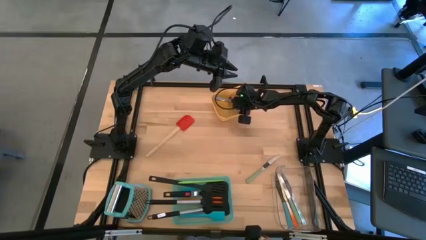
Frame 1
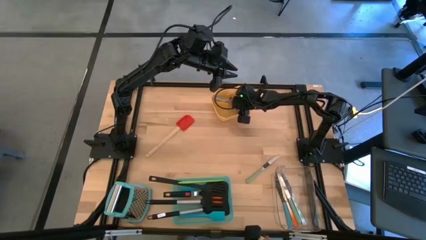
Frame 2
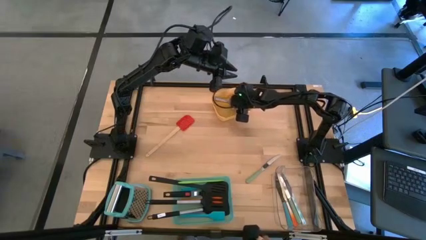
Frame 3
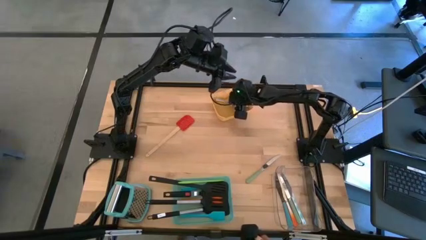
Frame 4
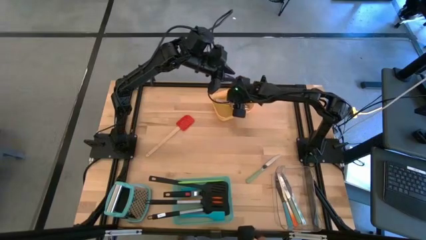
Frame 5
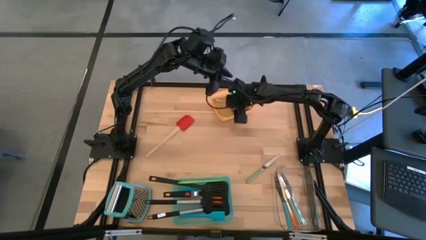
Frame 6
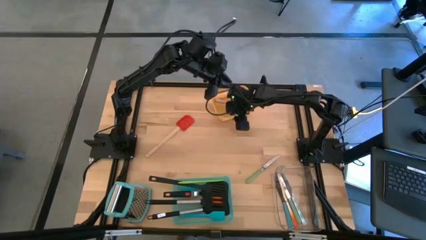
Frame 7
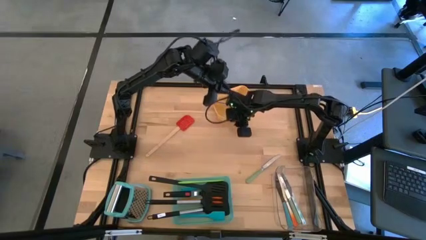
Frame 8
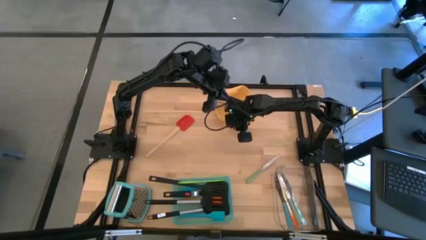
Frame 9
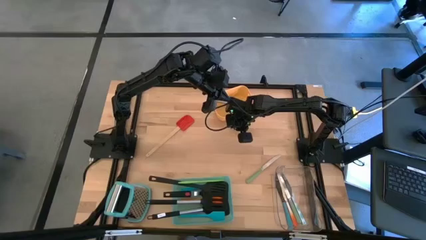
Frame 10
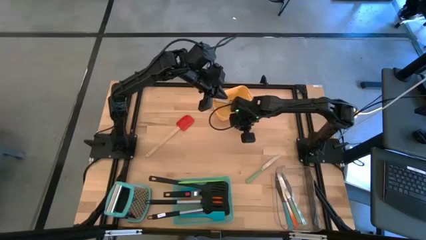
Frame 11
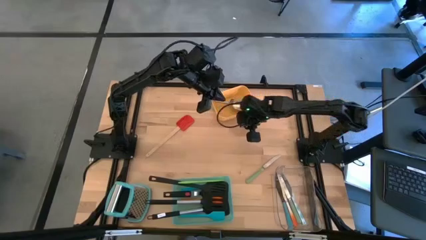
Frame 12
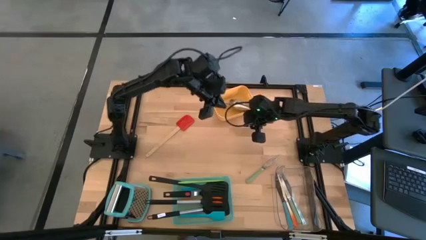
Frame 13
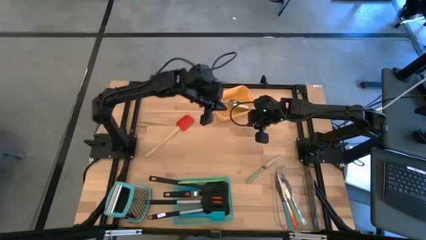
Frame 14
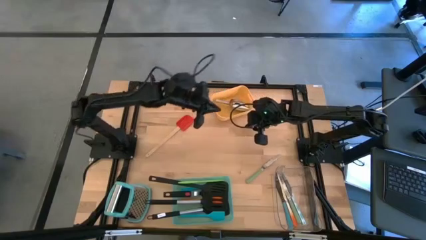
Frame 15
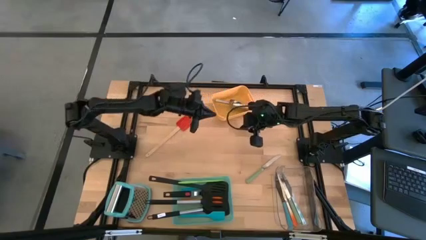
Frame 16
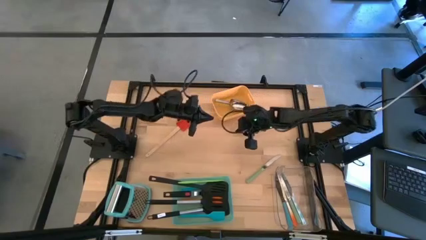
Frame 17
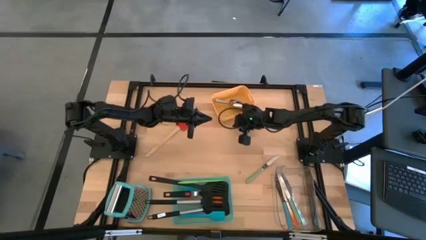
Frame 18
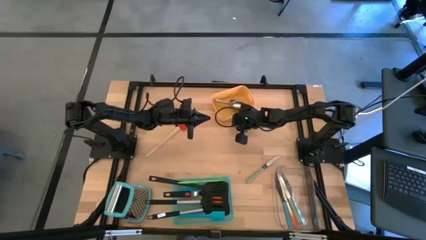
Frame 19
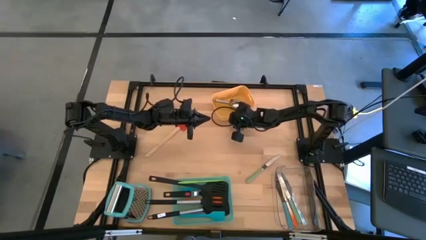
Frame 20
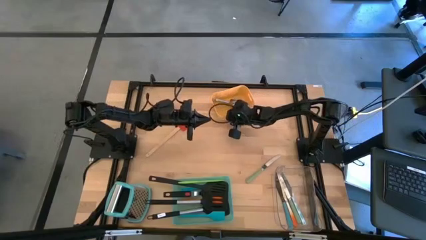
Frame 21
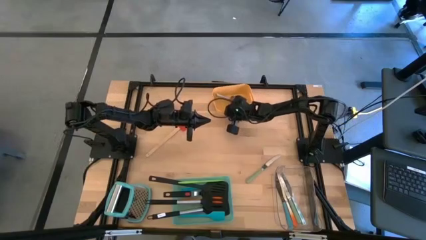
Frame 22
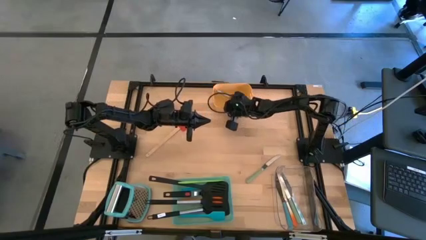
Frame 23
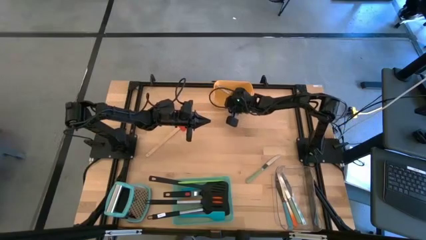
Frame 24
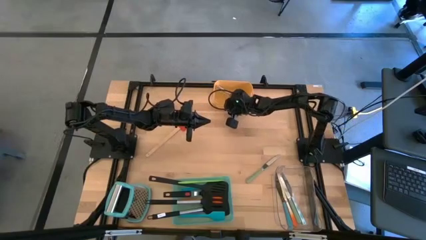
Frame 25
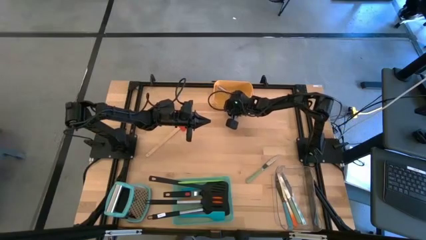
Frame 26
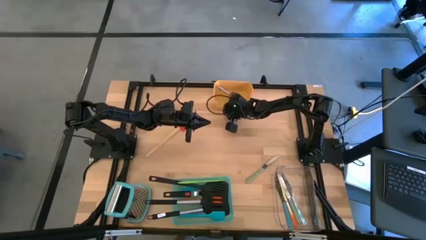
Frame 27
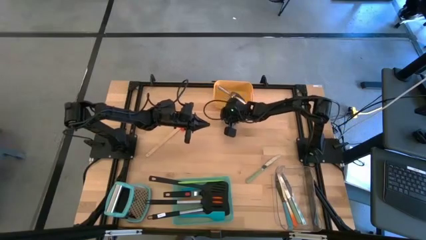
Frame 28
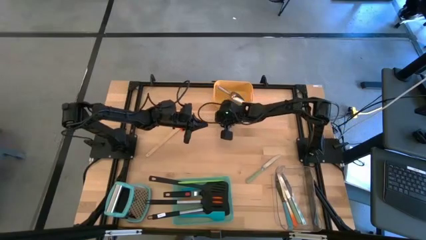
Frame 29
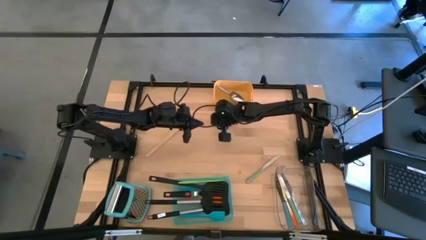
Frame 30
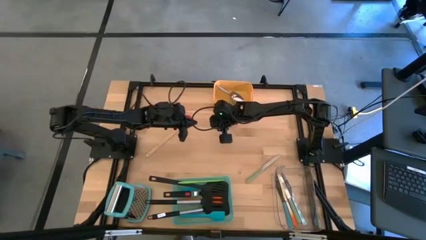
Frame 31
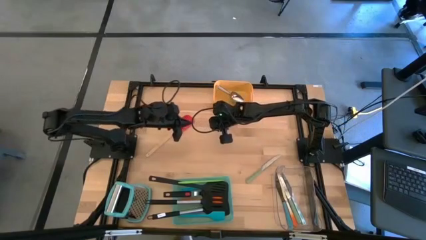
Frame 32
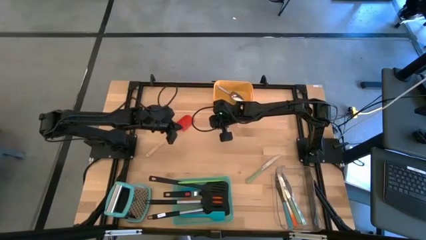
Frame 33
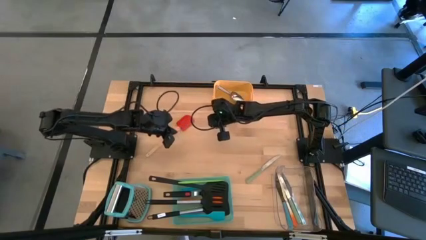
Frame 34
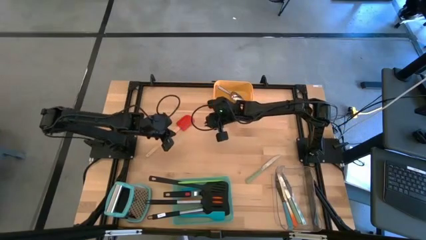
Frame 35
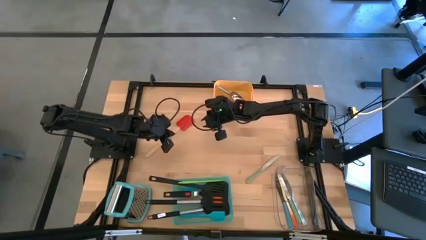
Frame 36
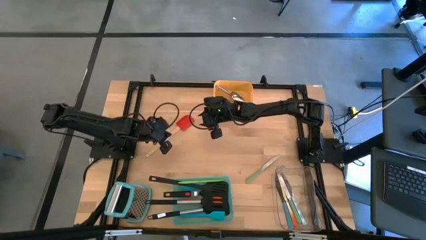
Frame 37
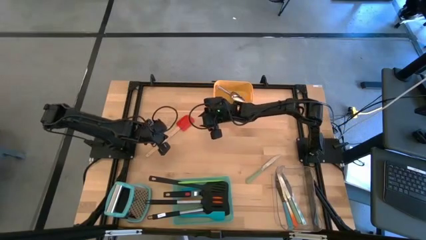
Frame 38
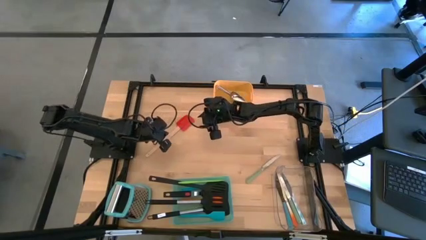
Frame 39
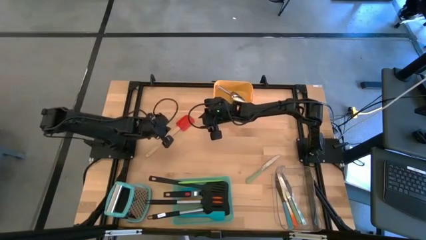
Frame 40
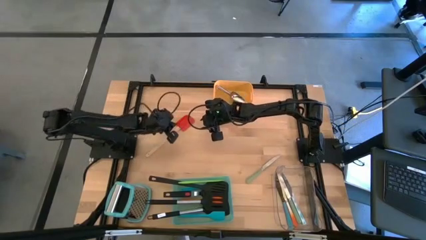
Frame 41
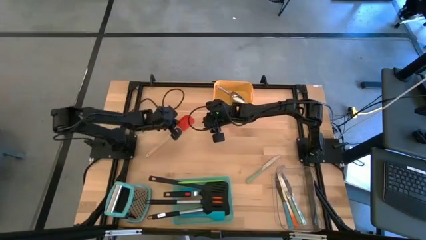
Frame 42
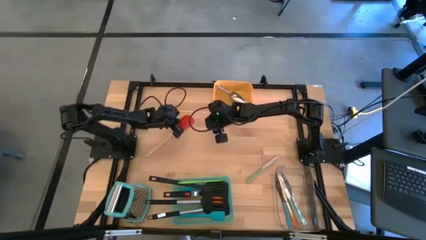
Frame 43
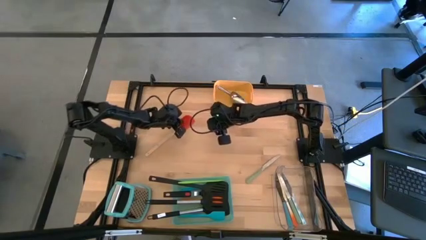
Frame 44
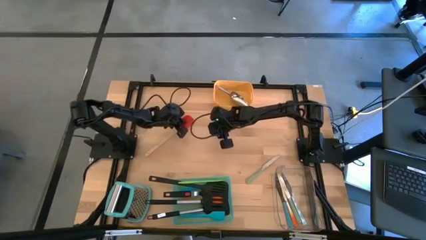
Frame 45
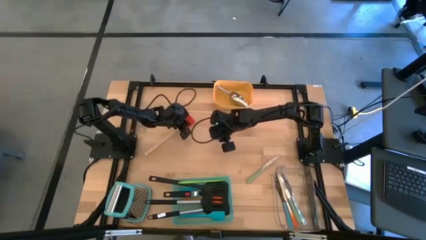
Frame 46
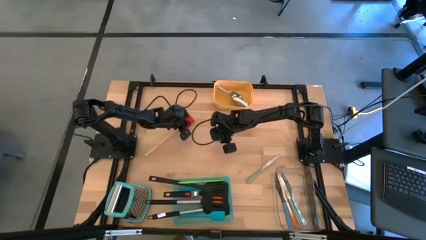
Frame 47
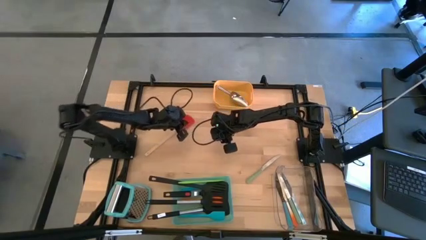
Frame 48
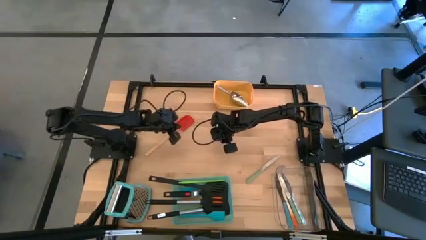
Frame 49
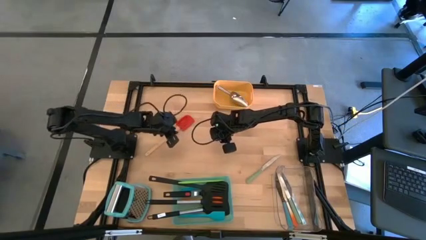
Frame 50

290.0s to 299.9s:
Task: Pick & Place Kitchen Items
Put the red spatula into the blue bin
